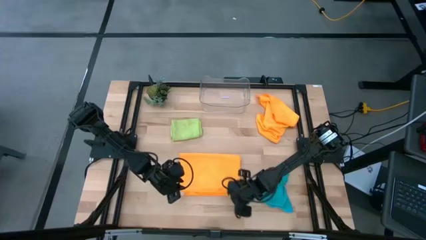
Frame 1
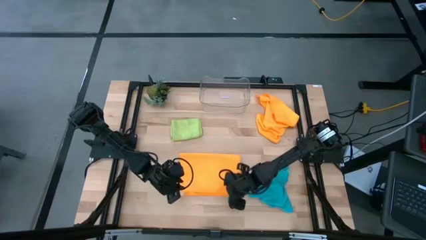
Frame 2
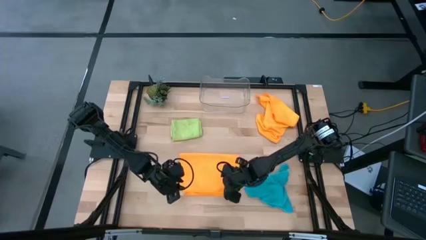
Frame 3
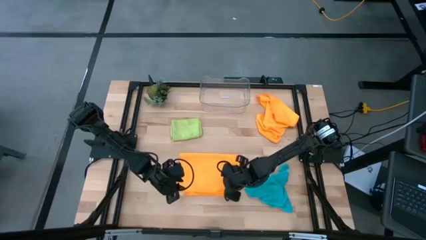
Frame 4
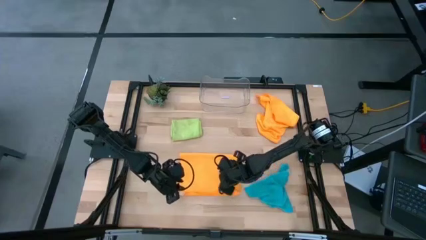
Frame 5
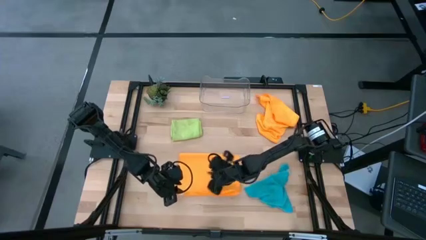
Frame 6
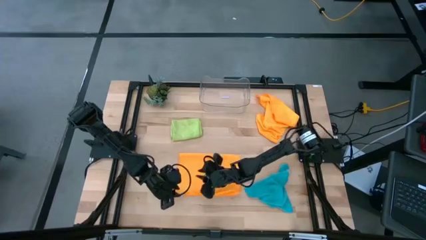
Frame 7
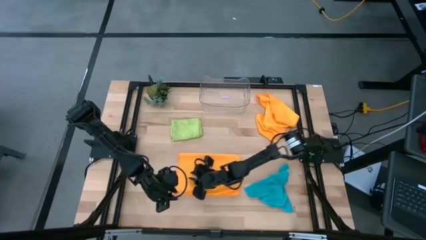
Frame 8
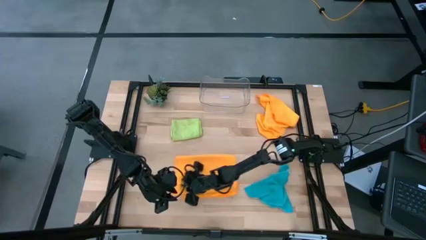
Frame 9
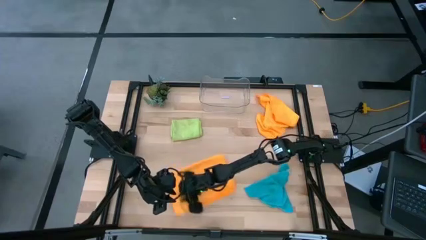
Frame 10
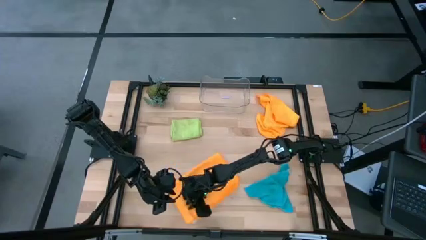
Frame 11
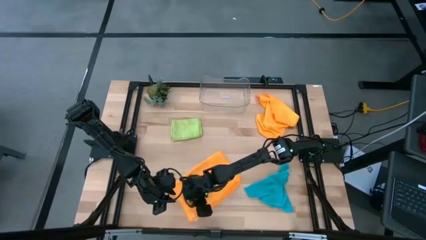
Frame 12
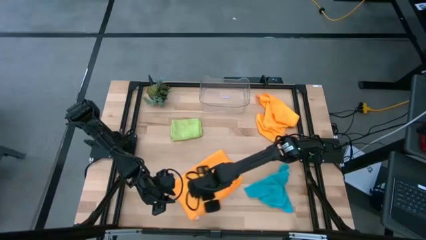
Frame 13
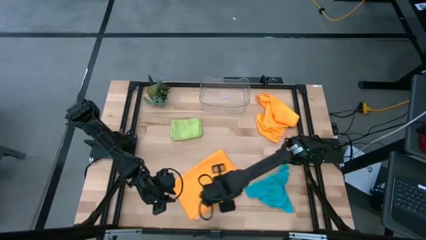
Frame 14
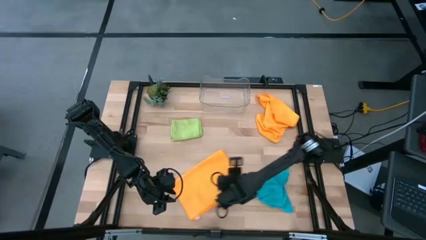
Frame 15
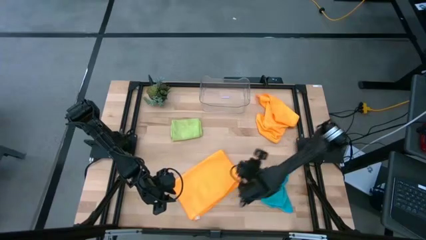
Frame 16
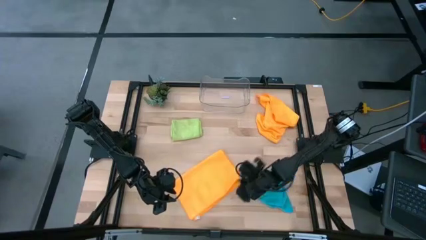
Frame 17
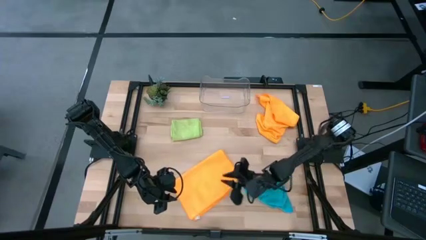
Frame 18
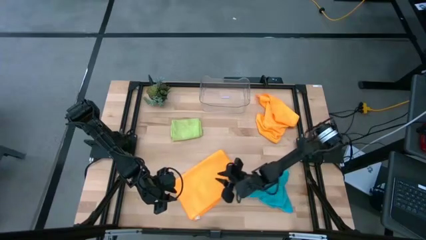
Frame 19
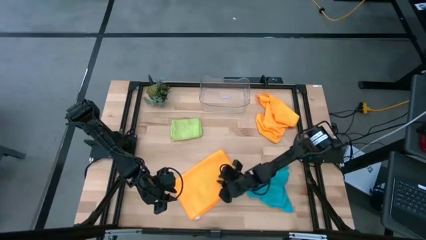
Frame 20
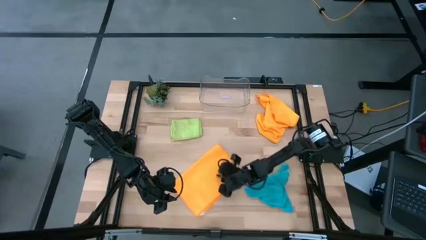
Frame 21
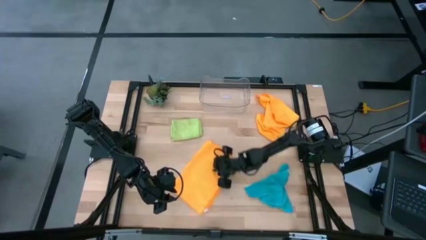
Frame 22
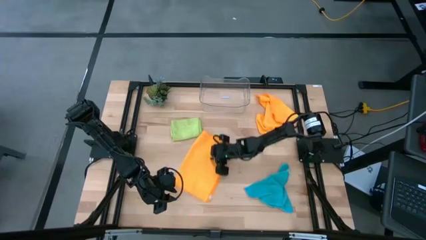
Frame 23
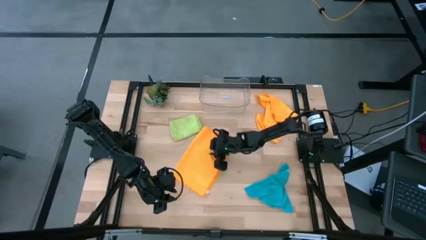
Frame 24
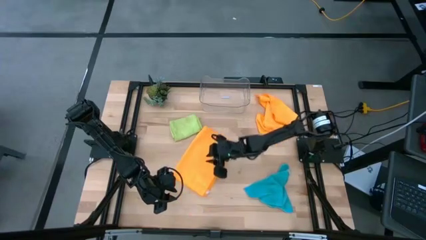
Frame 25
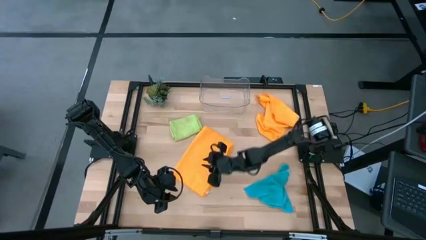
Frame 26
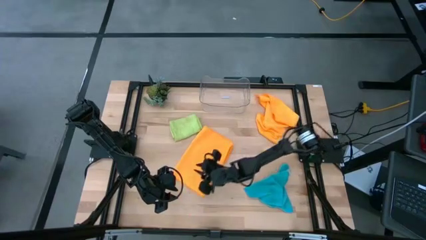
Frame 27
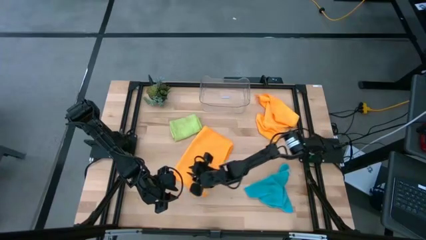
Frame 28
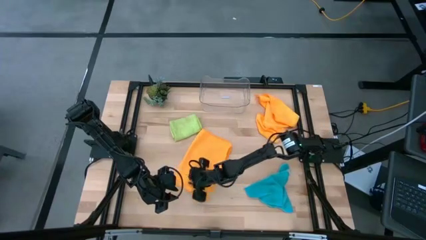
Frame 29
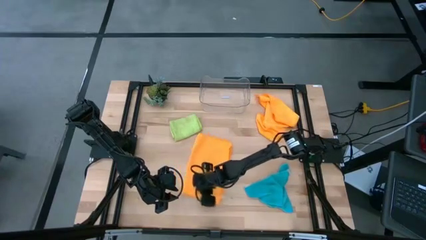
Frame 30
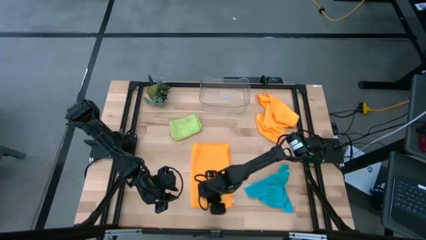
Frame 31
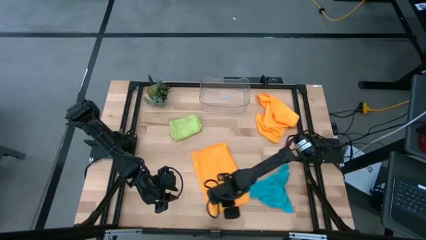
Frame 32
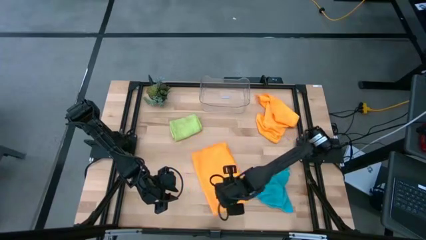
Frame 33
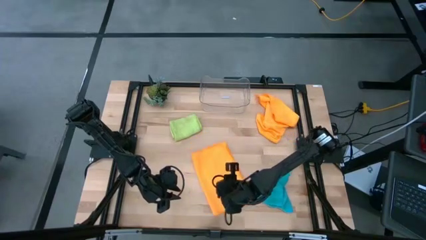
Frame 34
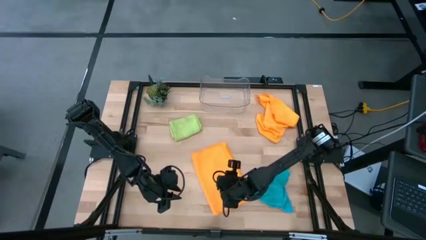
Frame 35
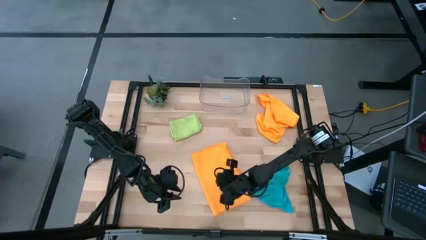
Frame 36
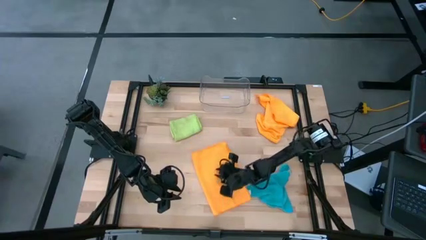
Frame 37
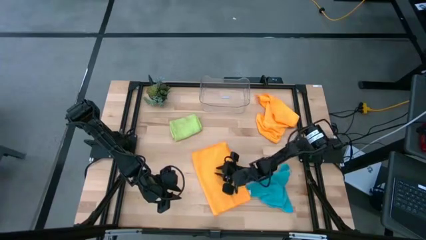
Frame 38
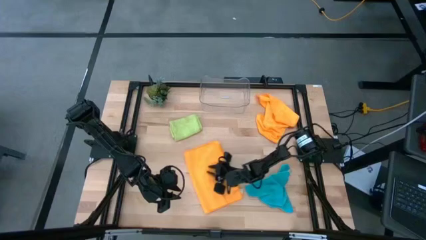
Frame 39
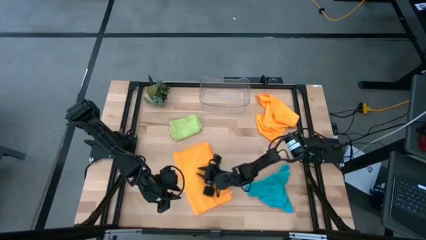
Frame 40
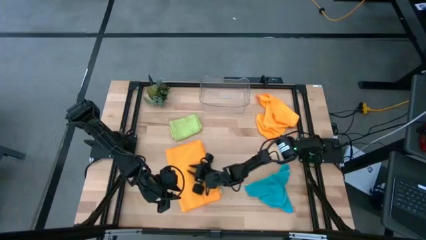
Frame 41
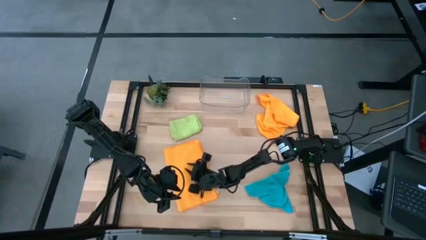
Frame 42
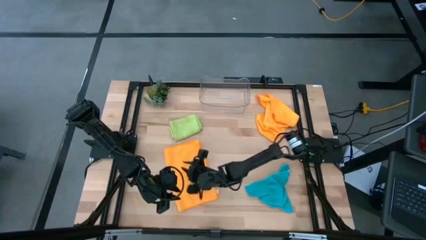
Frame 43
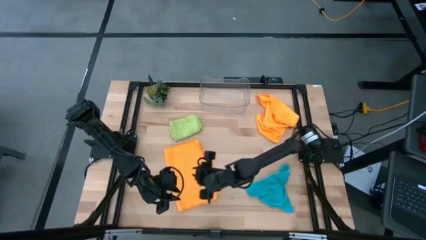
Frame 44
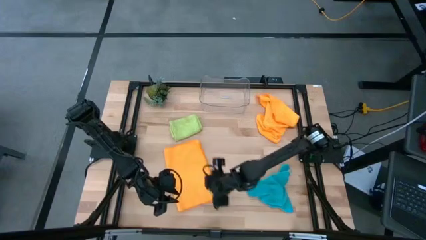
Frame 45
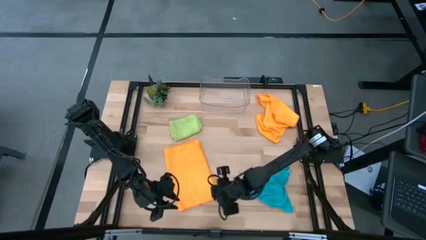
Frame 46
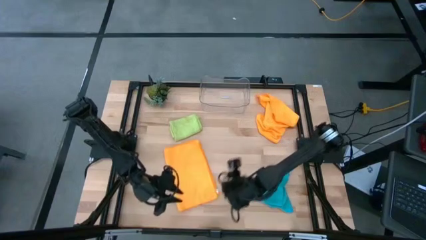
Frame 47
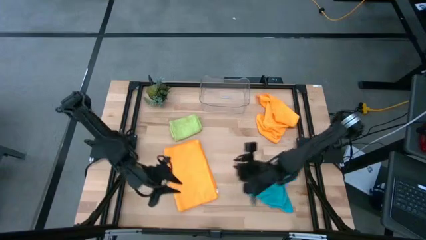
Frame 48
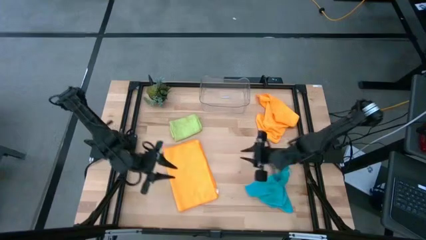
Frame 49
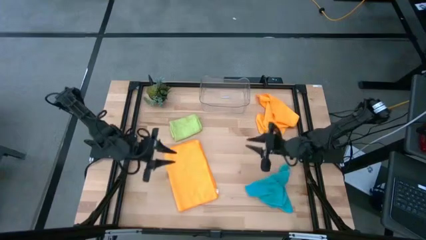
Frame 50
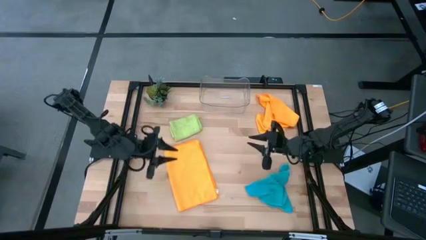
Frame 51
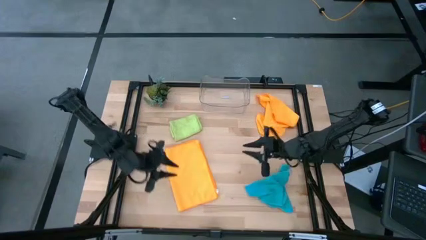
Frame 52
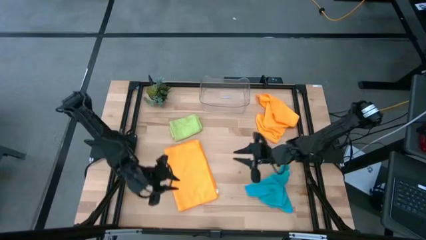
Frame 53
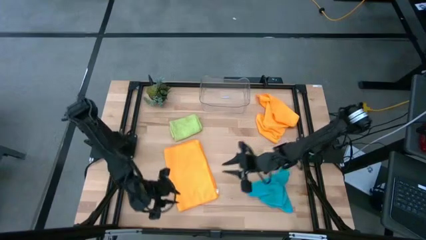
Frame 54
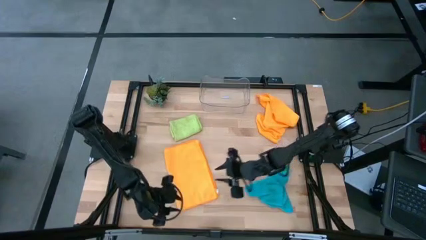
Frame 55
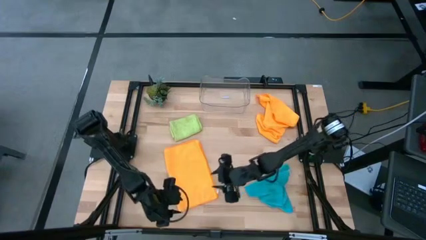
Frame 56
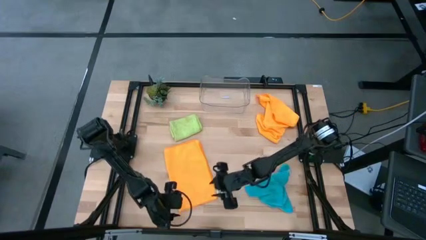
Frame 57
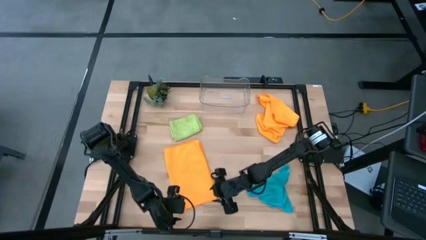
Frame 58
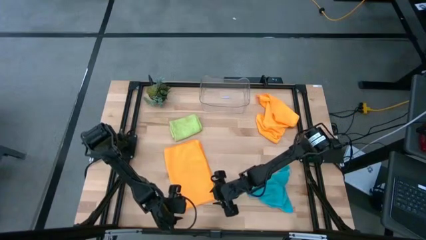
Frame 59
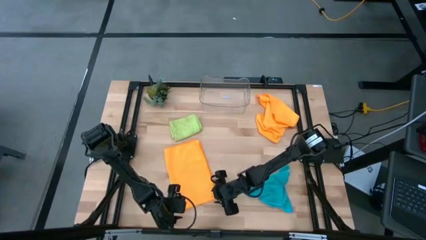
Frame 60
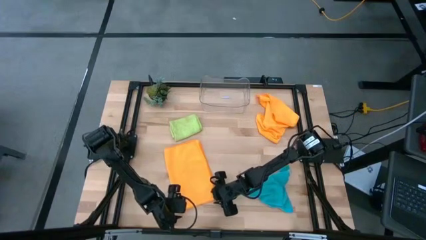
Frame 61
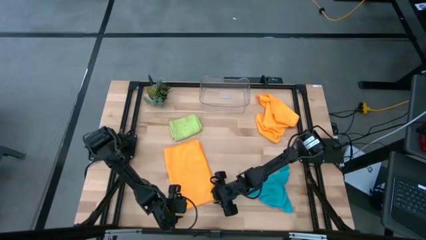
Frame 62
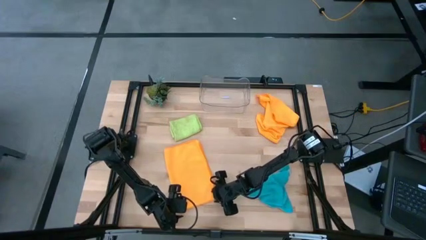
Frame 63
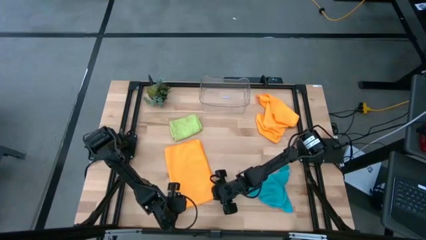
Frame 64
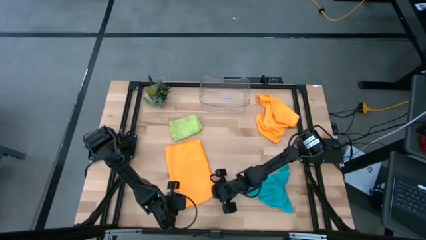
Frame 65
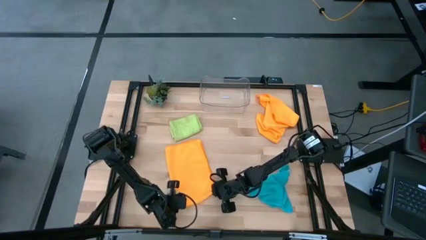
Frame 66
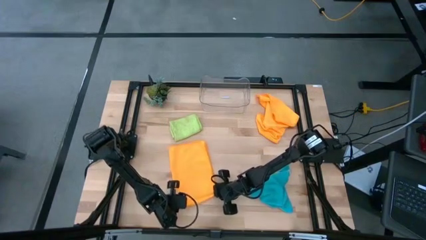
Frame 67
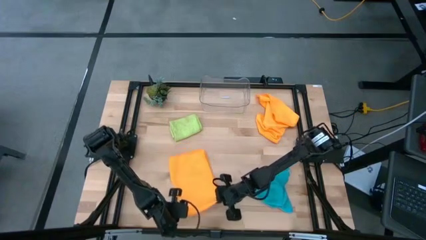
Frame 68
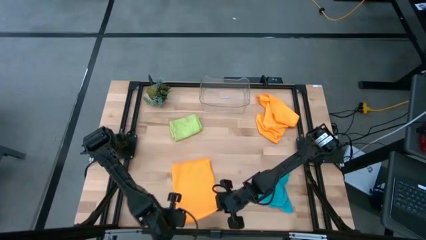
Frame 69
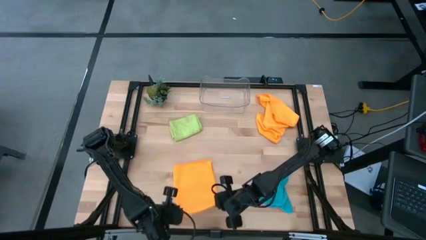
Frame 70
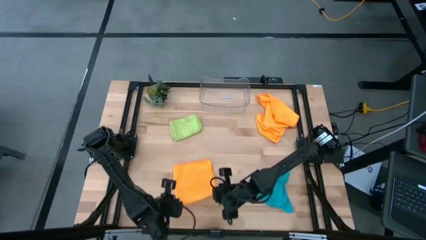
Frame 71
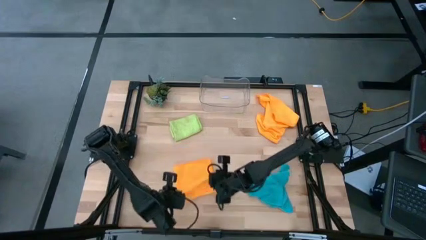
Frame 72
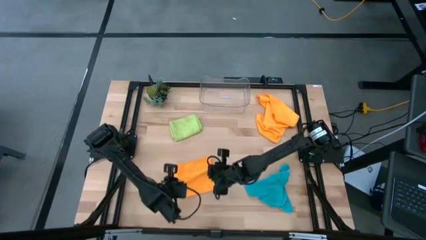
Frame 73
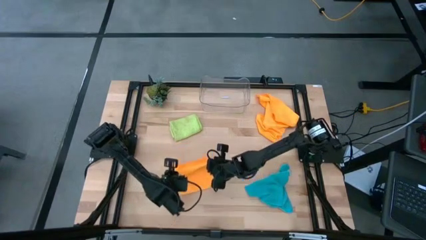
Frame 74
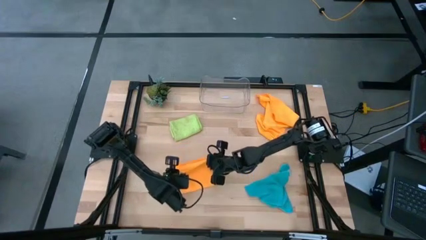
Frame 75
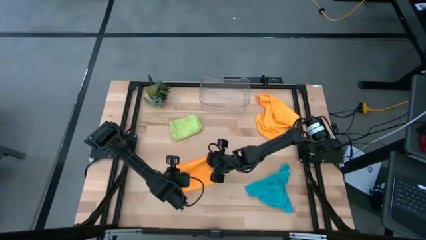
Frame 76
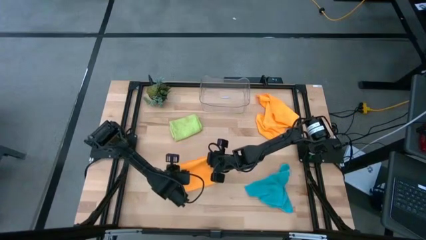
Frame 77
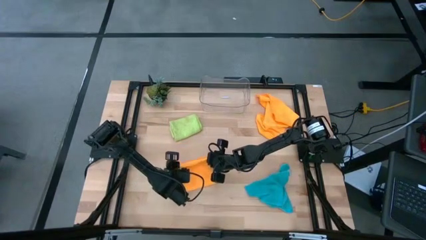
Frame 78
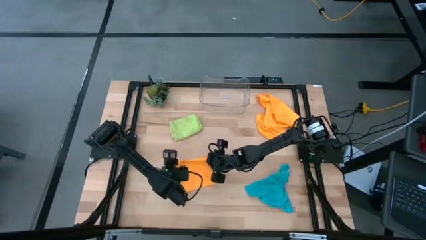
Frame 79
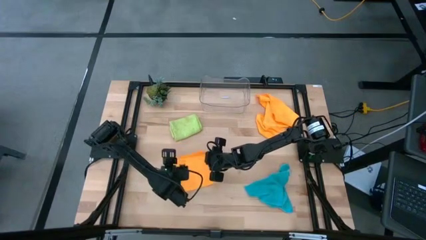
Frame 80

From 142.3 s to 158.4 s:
Task: Fold microfiber towels
Fold the bottom microfiber cloth

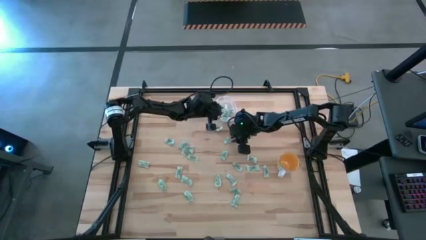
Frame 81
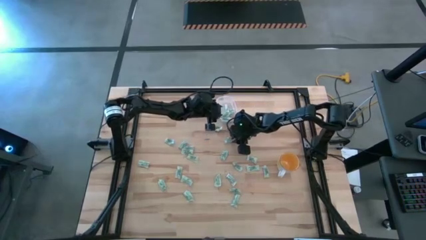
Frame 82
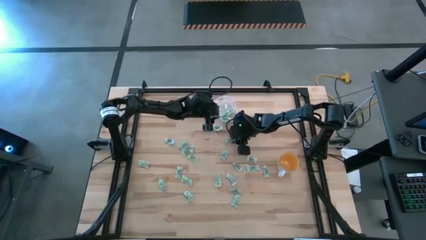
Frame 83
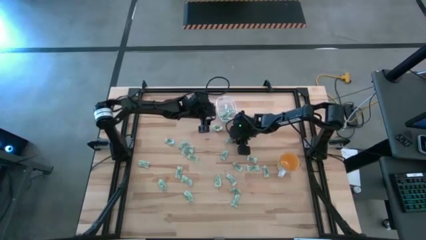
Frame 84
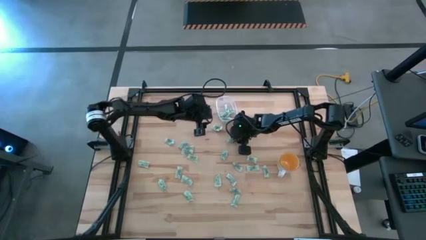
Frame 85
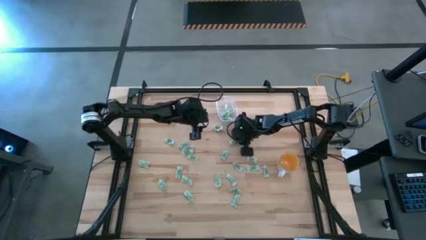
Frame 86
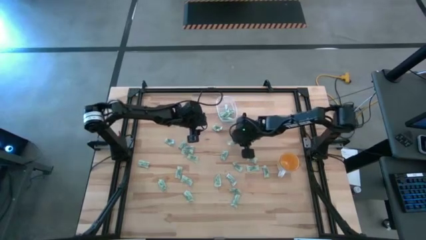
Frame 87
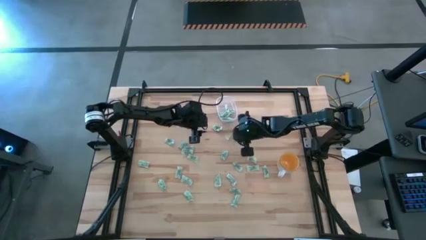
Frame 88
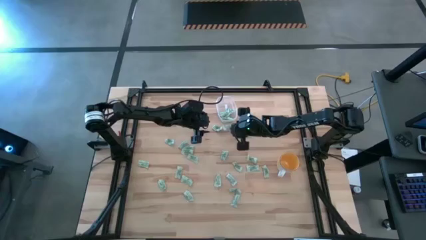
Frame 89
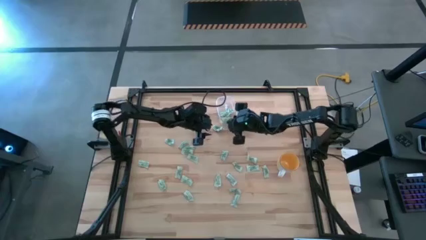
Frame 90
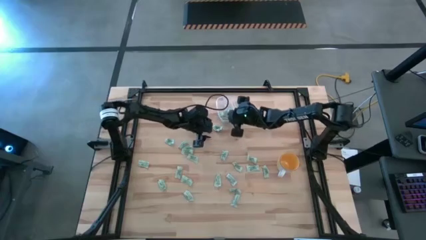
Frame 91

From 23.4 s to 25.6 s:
Task: Pick and place Stevia / Truvia into bins
Put the green stevia packet into the transparent bin
